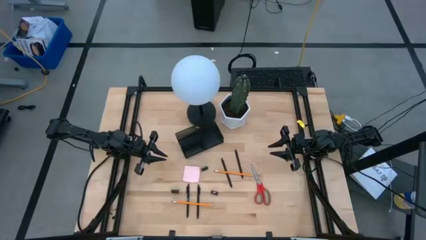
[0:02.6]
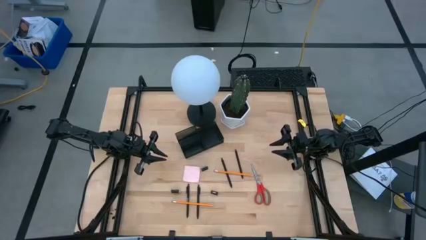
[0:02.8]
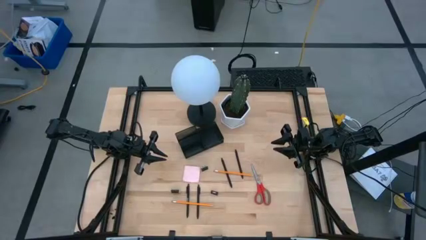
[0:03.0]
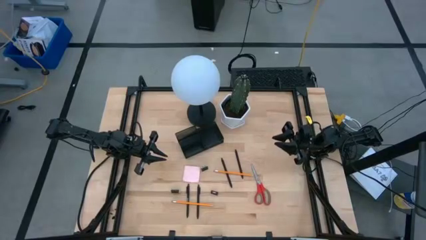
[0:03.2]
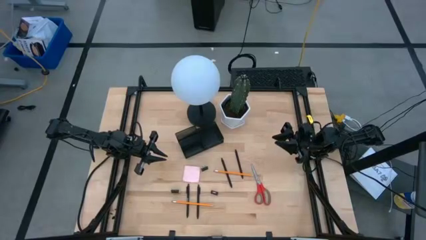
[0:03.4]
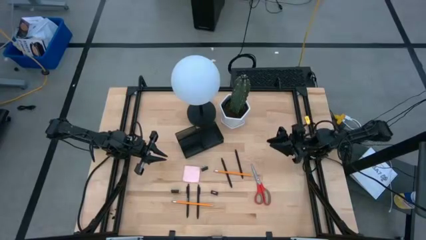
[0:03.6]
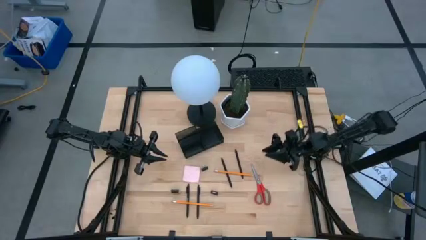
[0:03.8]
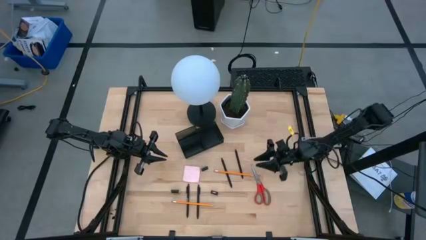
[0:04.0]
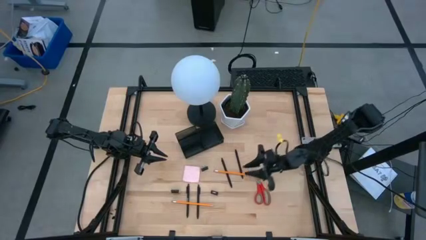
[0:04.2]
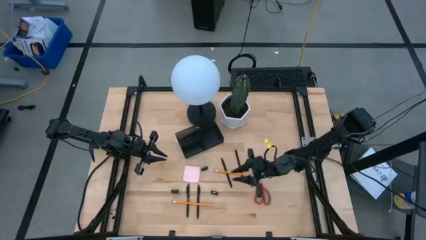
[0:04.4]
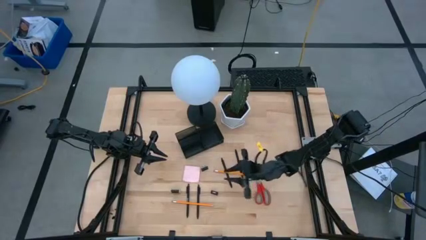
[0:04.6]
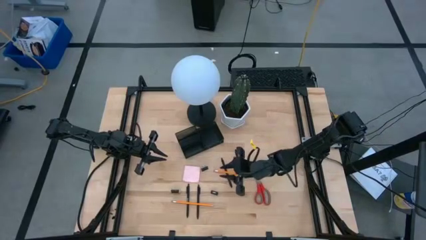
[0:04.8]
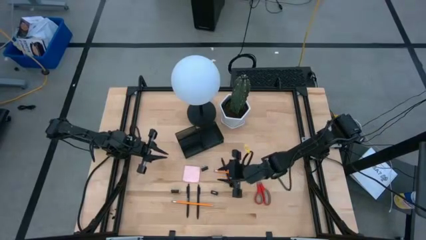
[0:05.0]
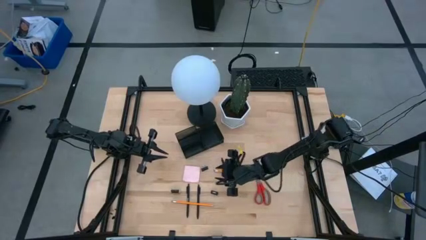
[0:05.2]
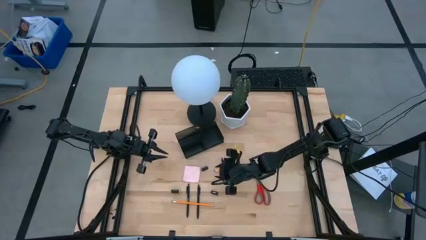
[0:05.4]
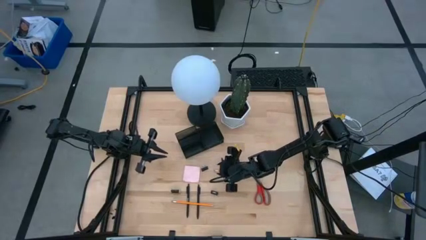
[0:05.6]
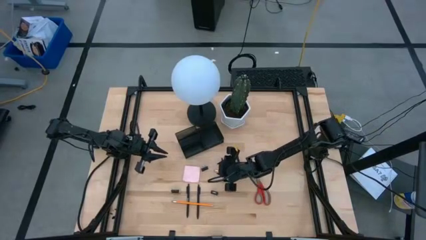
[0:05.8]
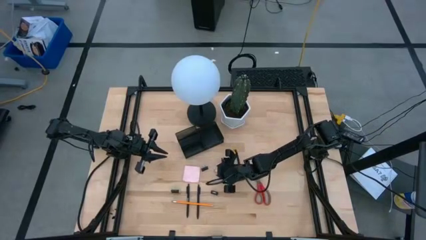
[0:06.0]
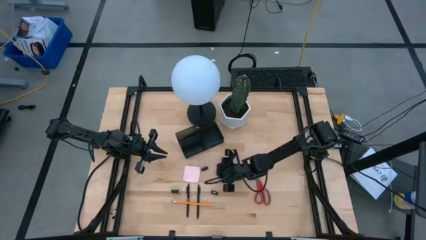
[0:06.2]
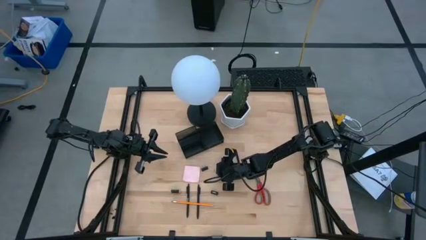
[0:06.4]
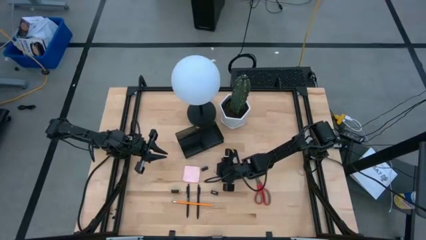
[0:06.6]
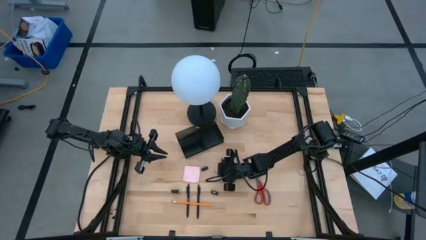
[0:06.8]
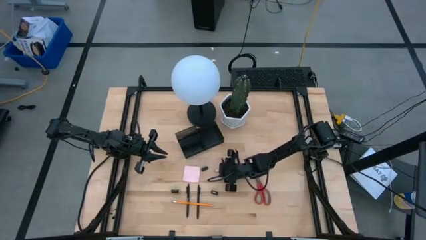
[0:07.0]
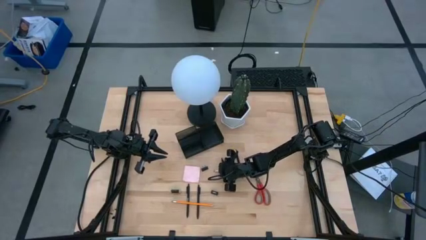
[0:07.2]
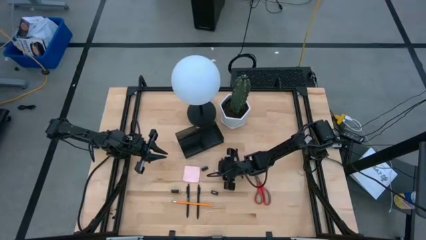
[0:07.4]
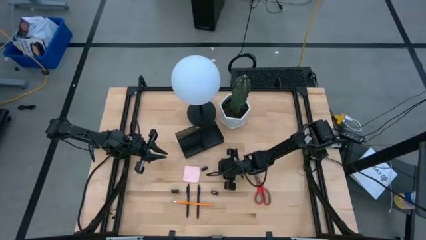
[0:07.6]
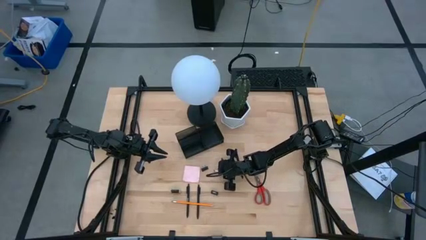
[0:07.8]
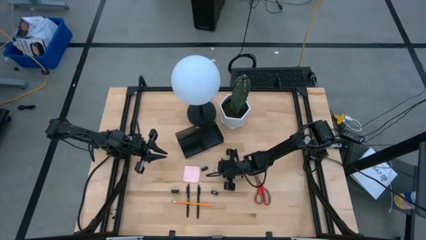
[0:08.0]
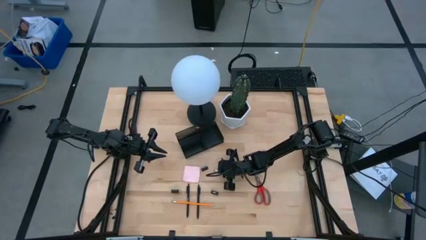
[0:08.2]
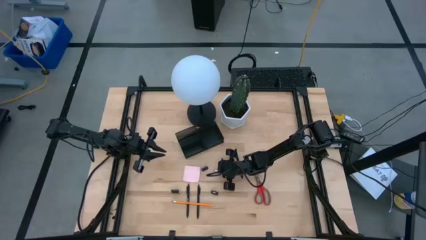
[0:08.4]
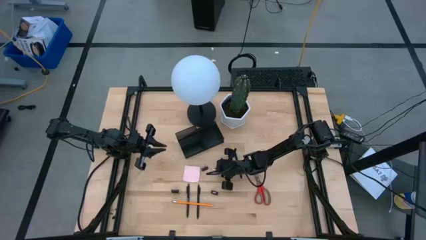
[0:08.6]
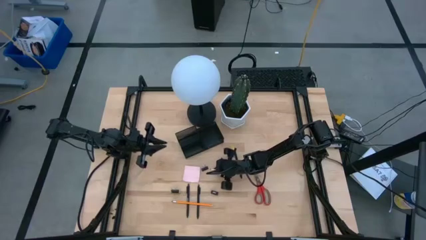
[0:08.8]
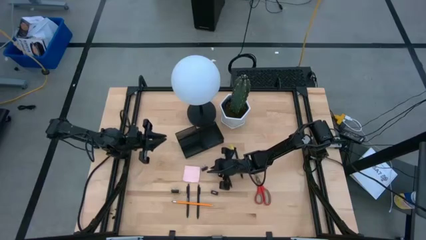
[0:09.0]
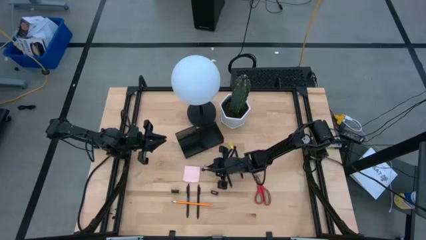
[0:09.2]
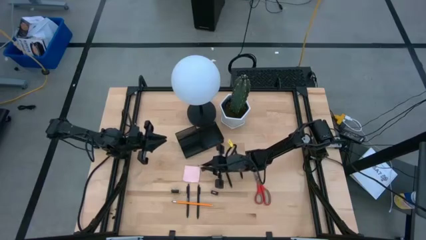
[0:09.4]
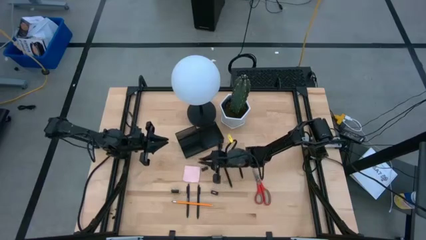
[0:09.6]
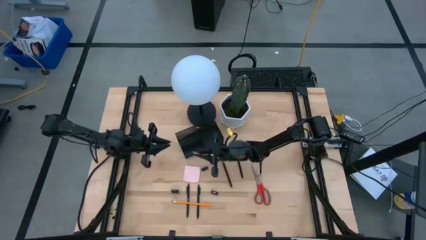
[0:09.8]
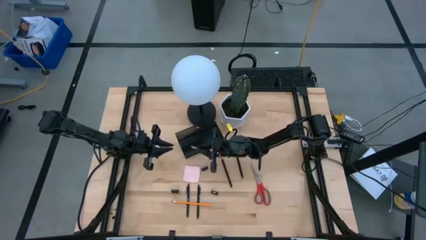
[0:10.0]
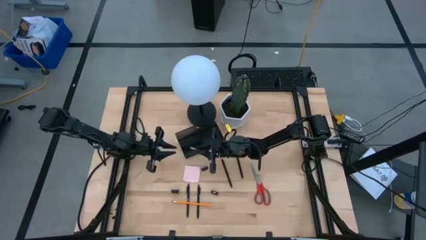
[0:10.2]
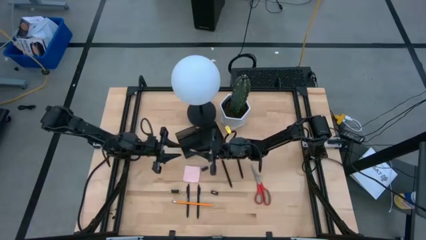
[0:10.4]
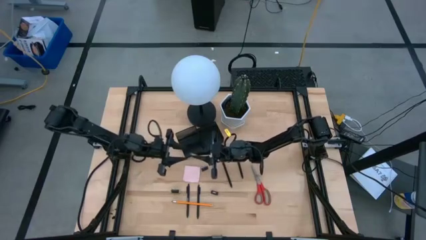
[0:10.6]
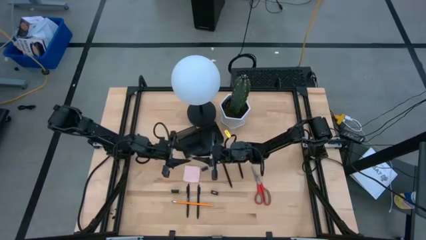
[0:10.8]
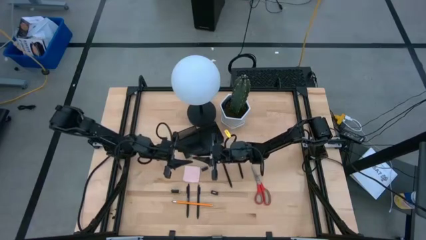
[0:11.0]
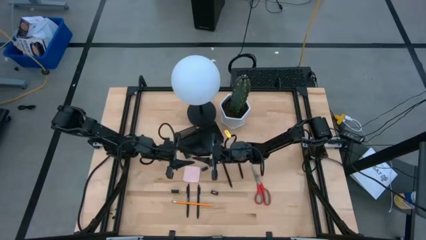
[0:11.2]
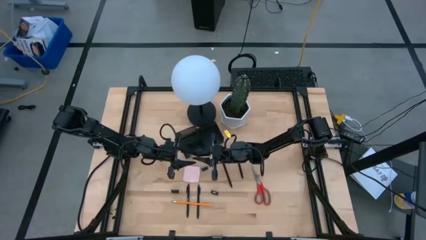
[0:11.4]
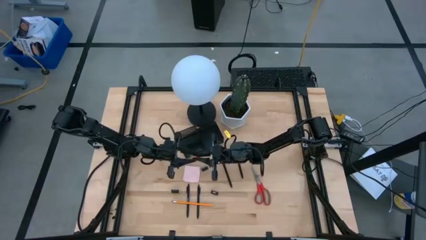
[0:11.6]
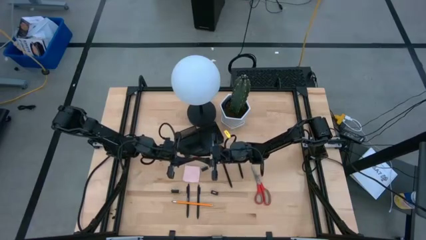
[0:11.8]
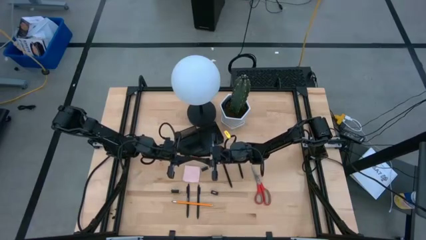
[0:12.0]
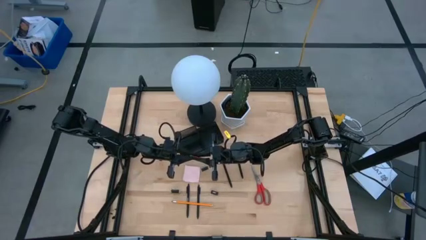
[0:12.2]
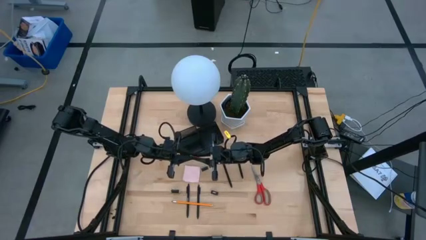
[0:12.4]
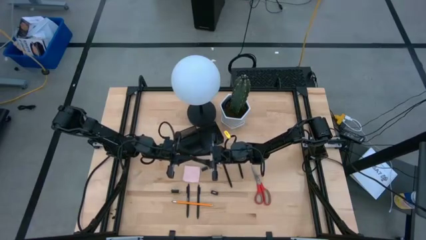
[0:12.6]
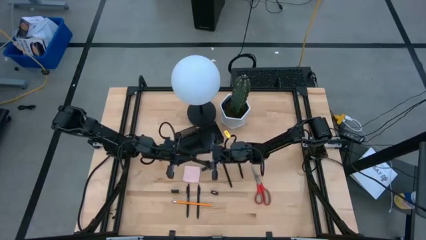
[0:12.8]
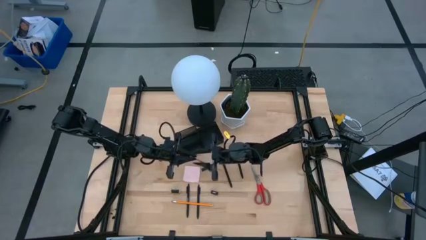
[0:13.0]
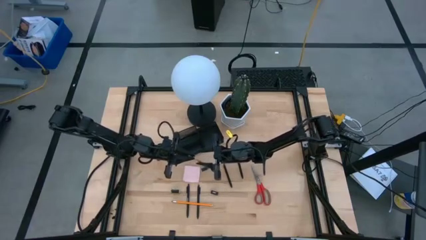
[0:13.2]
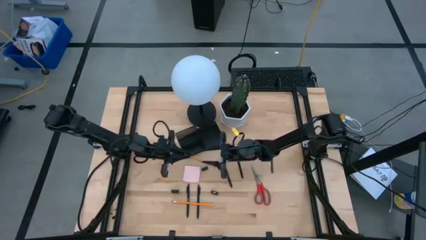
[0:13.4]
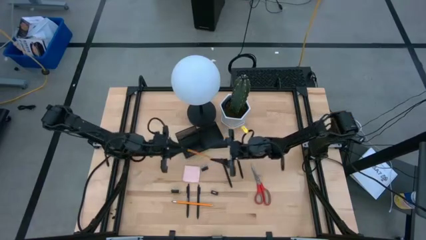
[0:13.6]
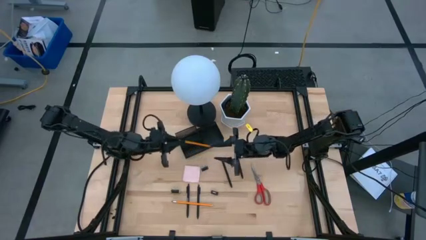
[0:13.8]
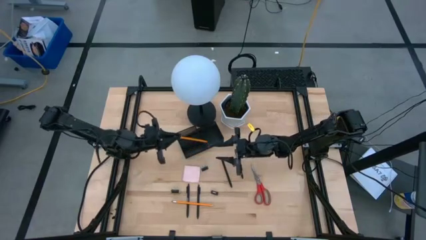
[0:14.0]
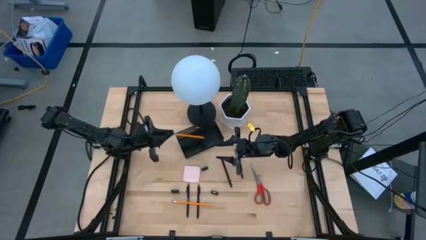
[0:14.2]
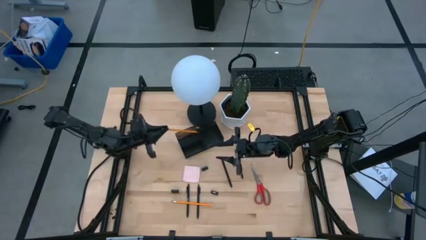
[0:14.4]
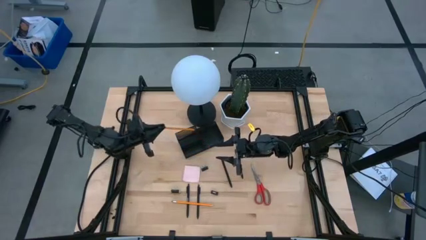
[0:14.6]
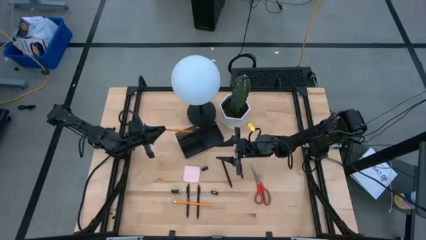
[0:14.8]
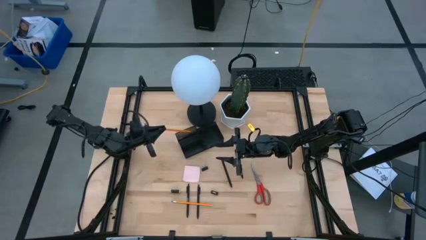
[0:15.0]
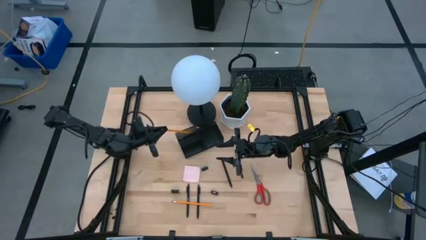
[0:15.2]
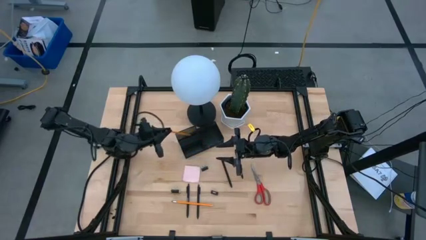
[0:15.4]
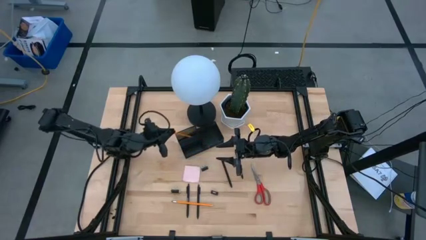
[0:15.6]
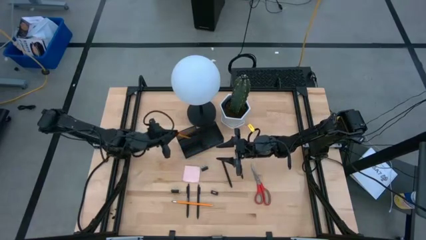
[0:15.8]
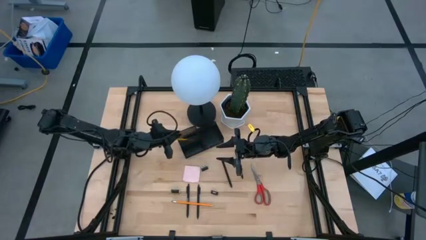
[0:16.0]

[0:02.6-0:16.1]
Task: Pick and place office supplies into organizer
Put the top orange pencil into the desk organizer
